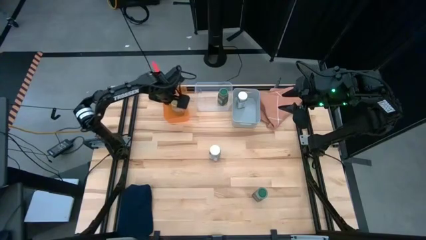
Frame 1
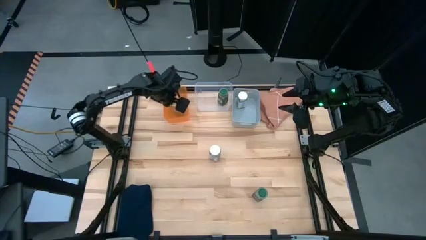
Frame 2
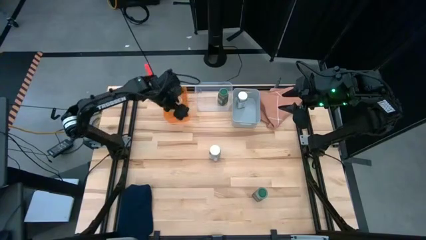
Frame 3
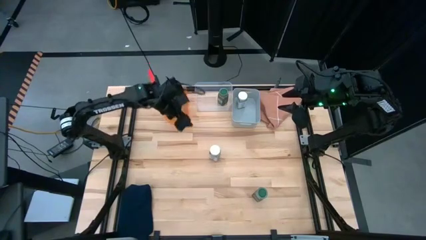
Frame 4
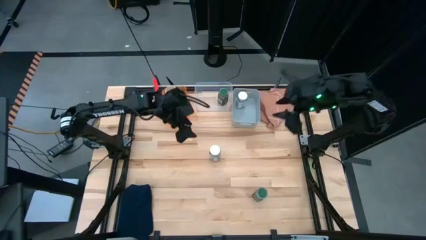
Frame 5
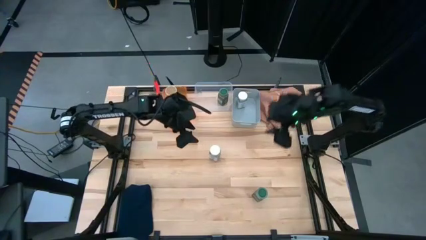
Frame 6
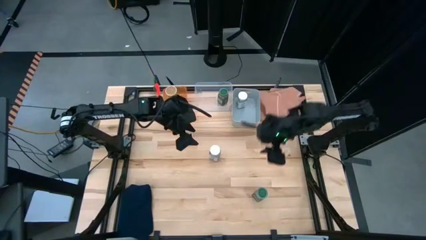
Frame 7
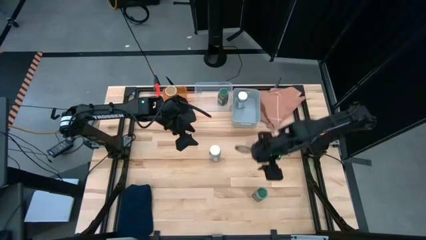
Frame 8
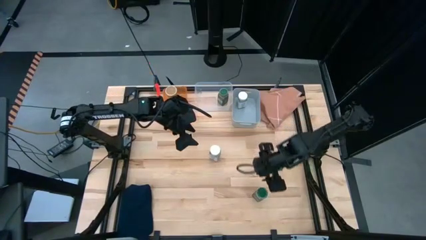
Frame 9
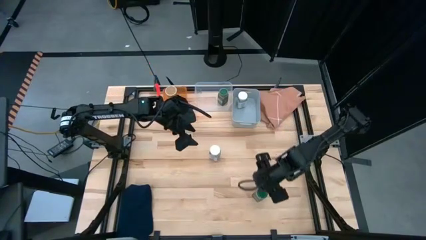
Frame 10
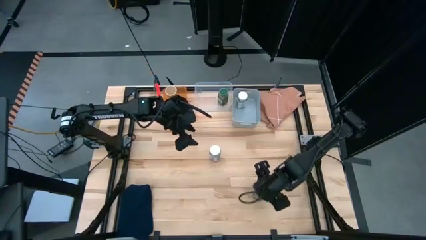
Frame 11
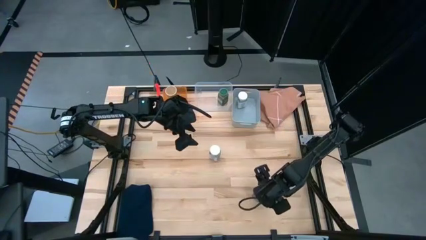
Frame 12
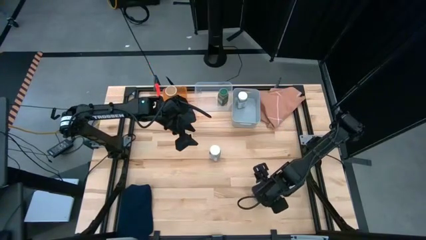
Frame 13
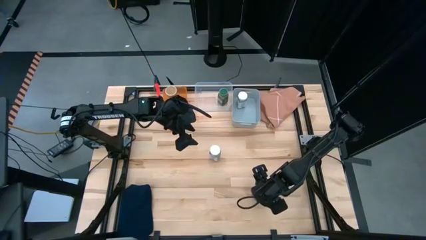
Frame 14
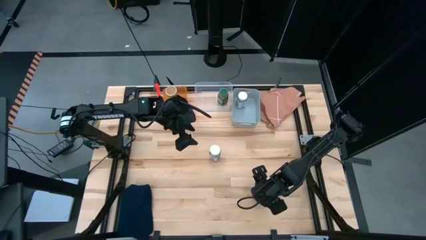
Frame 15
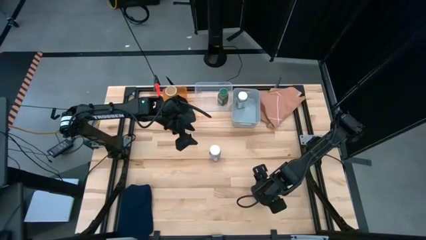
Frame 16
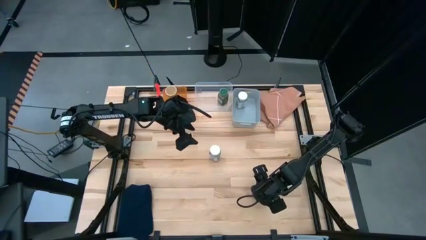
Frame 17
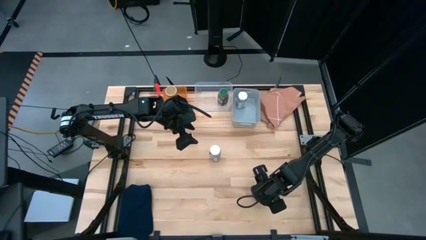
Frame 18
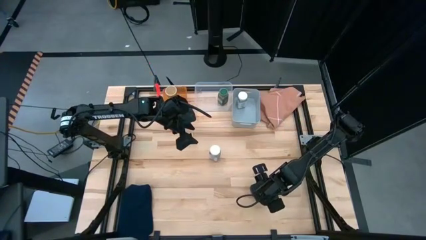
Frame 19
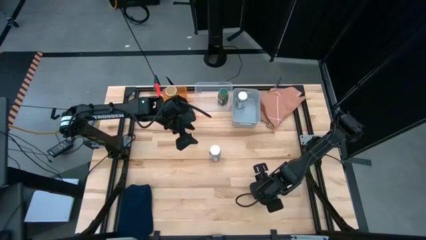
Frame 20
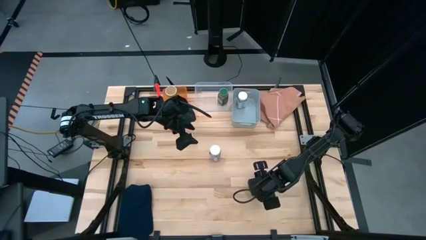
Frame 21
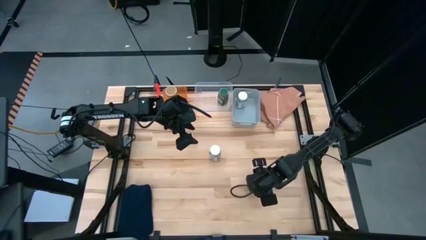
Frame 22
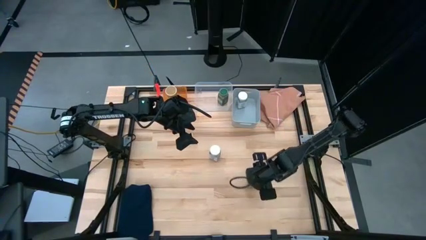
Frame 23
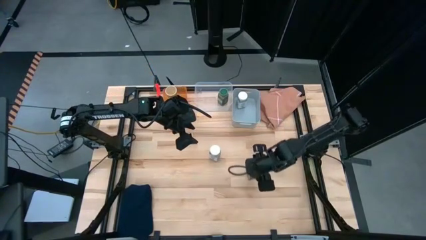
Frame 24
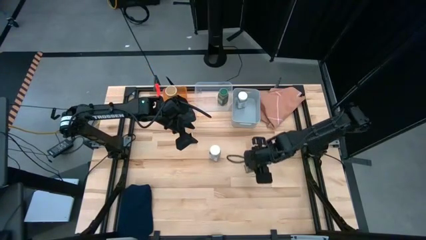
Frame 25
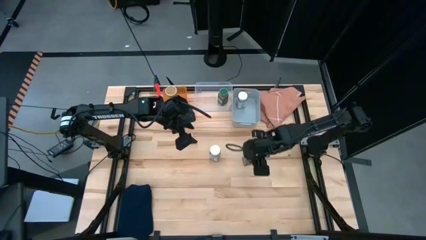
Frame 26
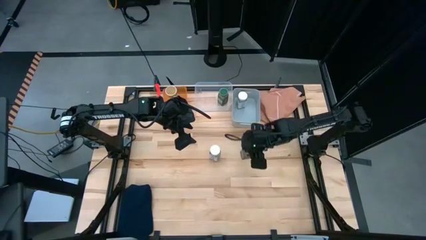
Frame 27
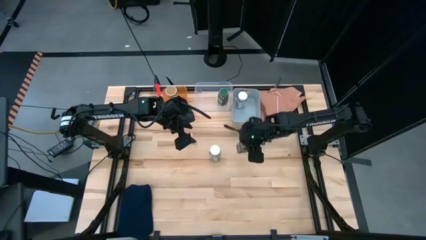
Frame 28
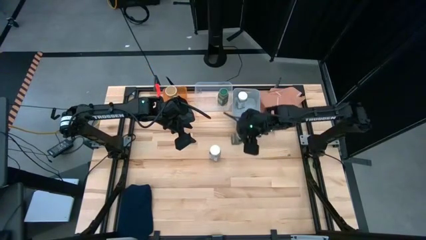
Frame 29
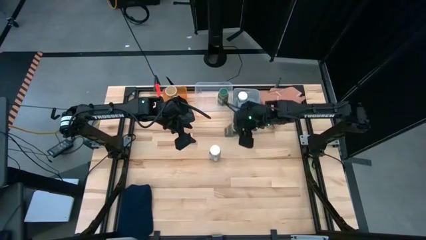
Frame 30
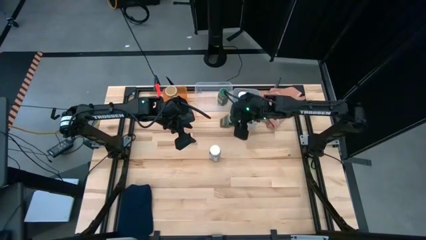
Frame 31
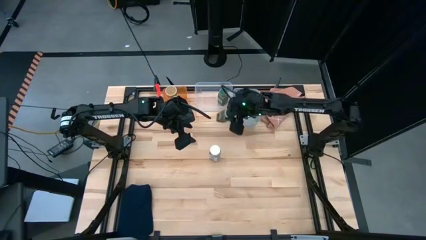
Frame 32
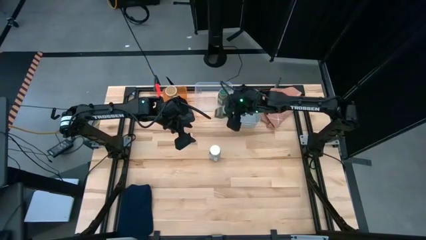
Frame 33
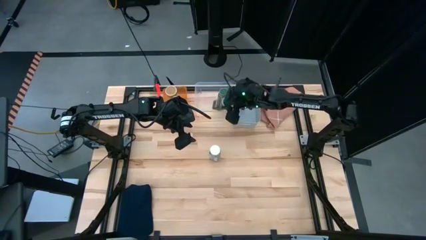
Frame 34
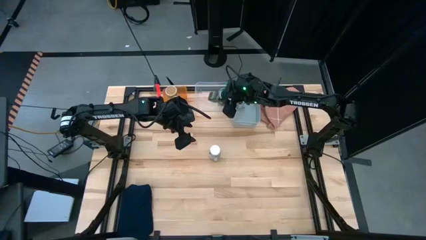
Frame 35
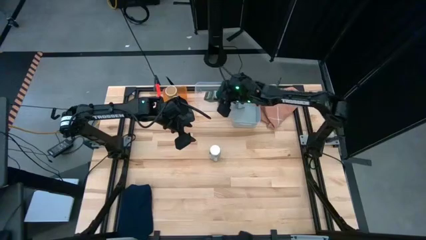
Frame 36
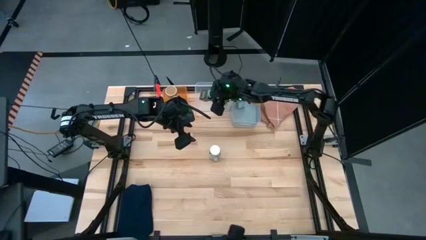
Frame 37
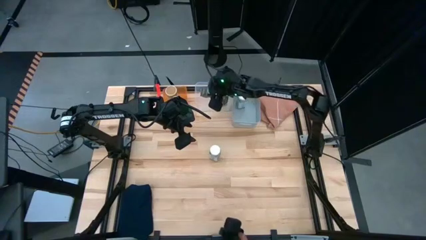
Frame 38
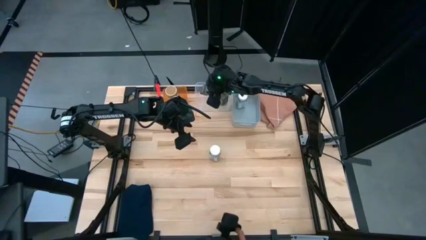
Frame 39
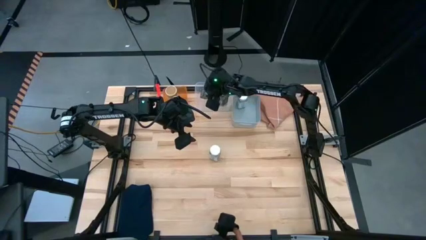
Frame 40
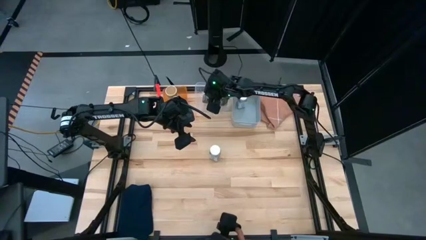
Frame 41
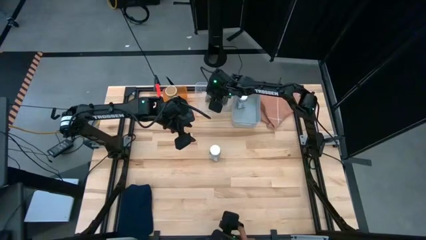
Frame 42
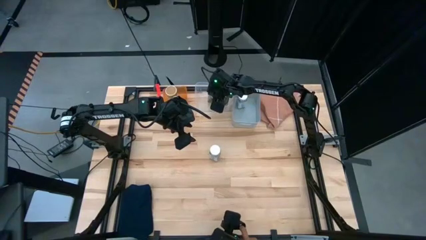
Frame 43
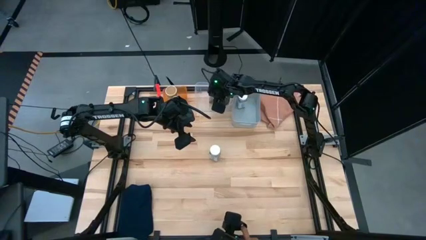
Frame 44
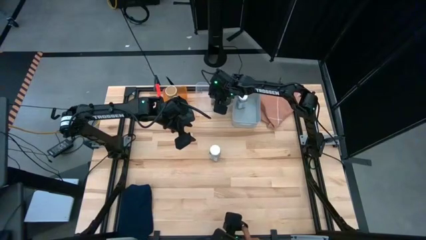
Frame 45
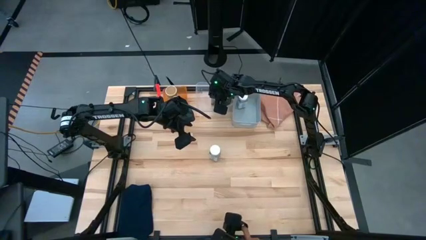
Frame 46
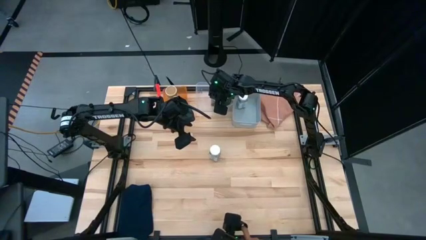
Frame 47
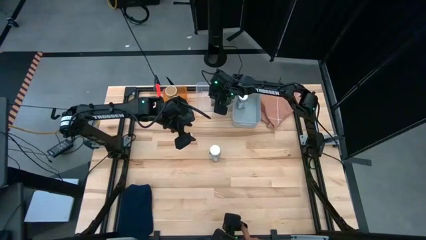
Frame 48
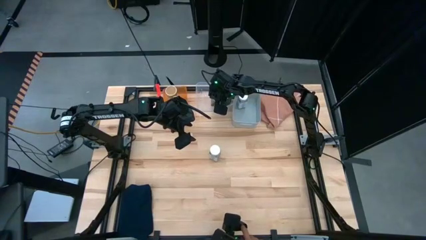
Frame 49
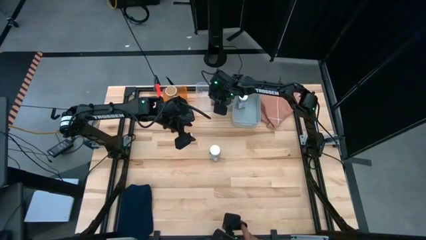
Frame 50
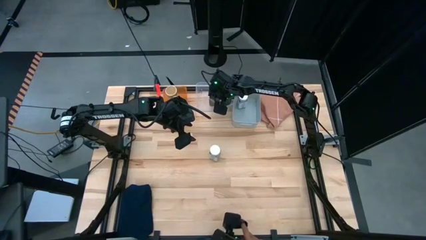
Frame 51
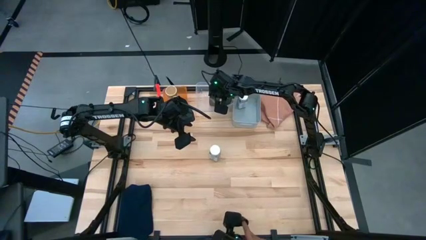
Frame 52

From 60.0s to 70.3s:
Task: Sort spices by type
Put the green seasoning bottle into the transparent bin

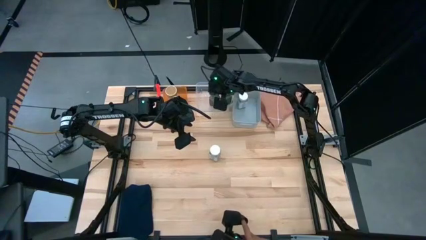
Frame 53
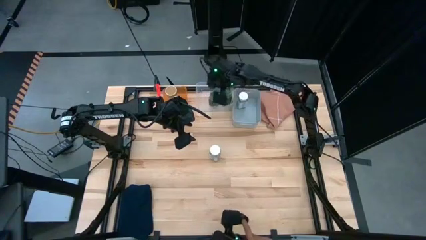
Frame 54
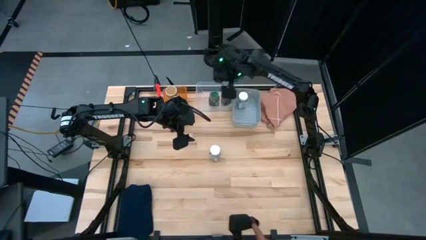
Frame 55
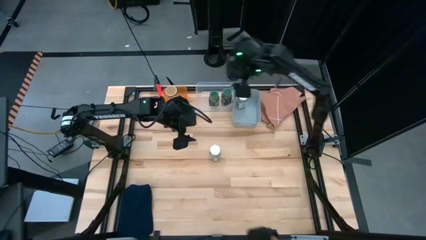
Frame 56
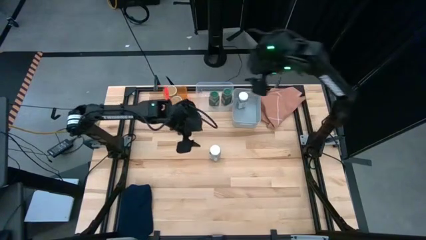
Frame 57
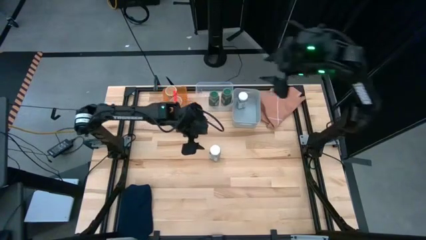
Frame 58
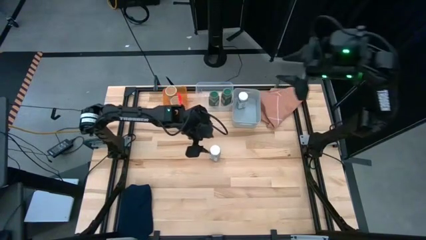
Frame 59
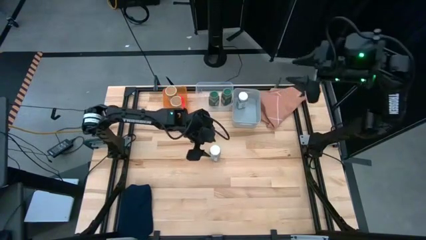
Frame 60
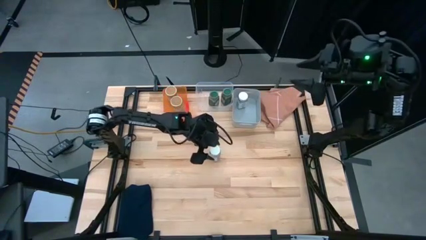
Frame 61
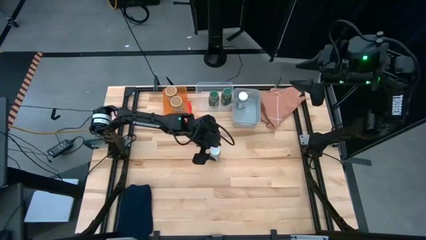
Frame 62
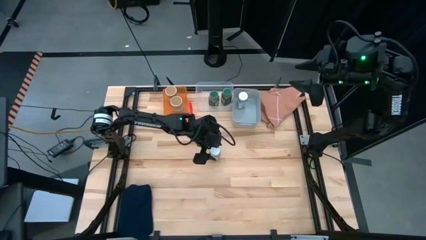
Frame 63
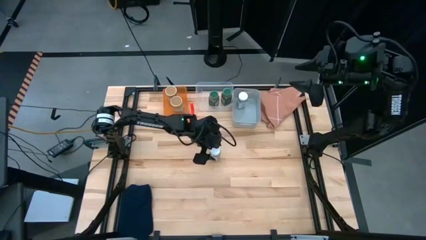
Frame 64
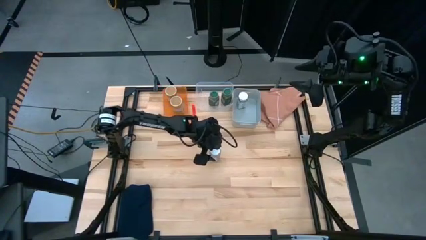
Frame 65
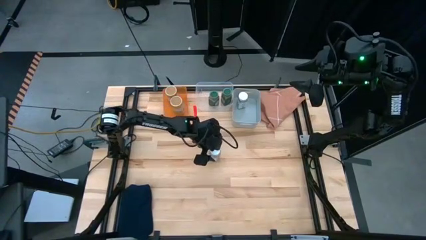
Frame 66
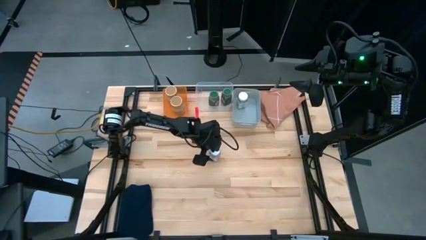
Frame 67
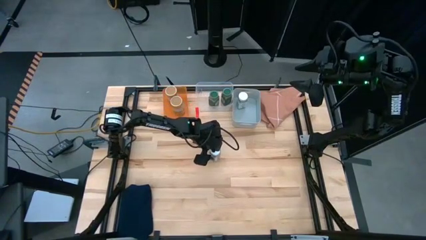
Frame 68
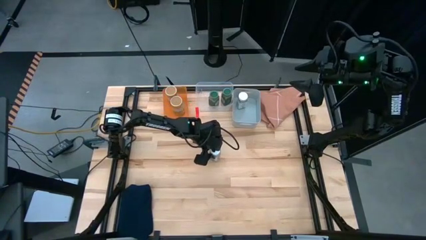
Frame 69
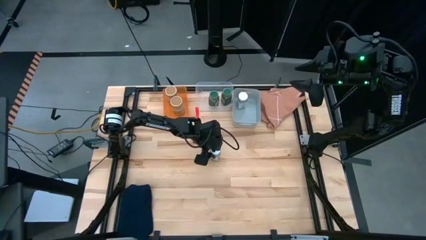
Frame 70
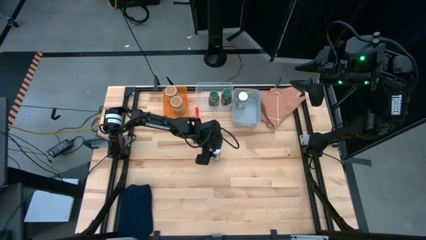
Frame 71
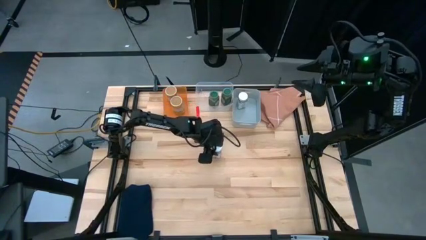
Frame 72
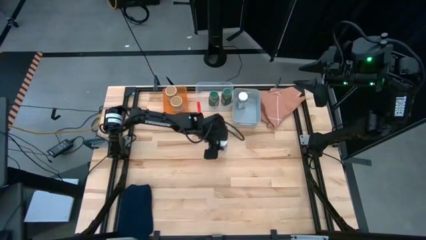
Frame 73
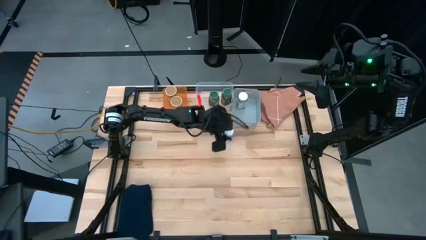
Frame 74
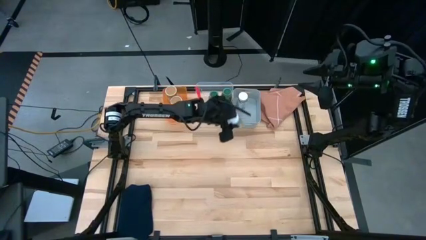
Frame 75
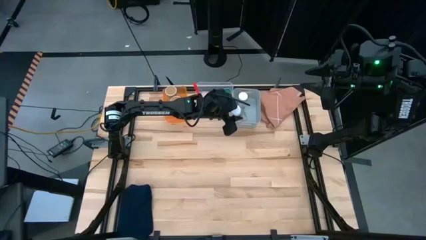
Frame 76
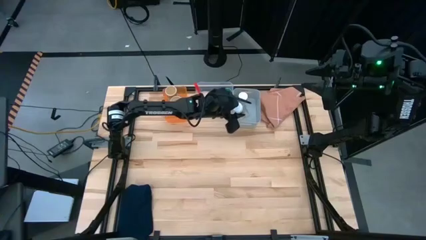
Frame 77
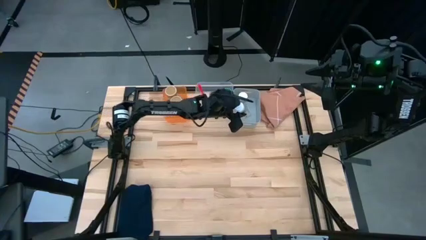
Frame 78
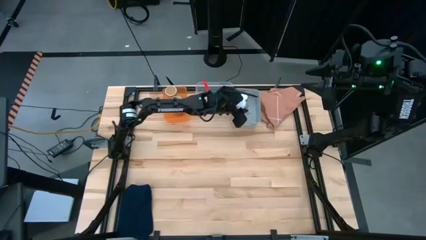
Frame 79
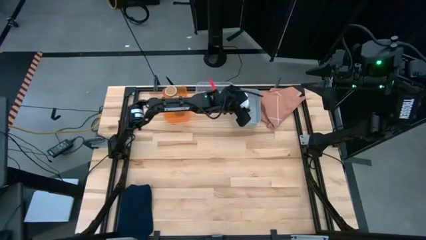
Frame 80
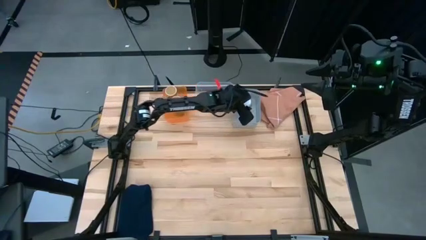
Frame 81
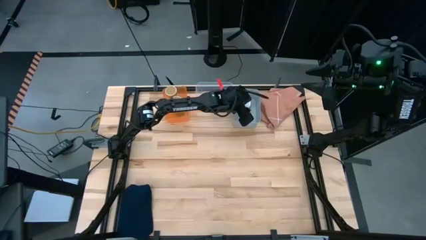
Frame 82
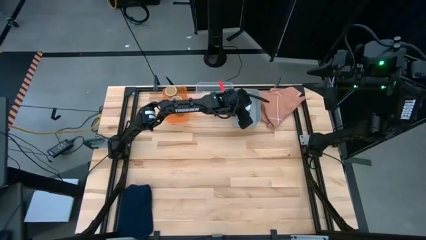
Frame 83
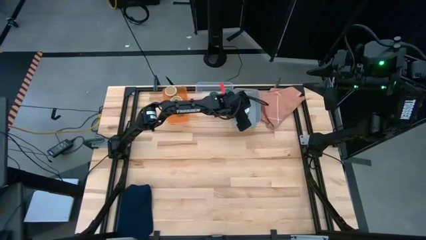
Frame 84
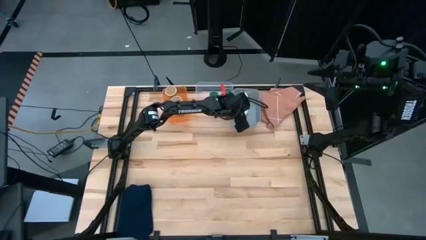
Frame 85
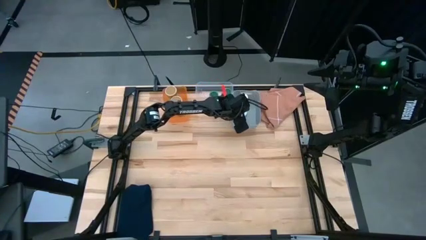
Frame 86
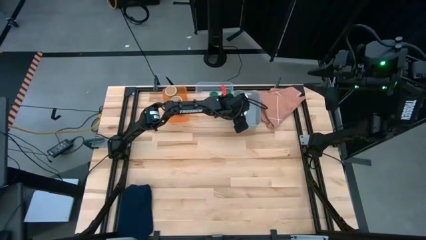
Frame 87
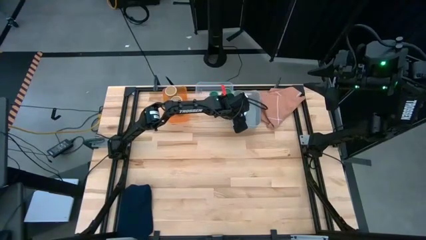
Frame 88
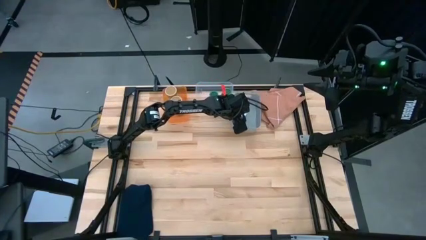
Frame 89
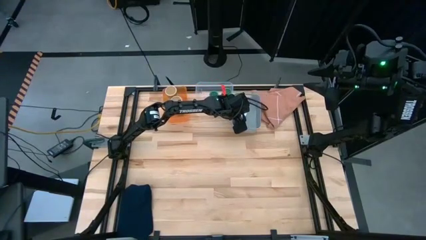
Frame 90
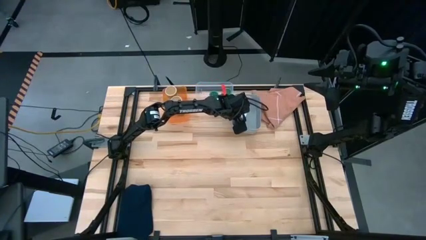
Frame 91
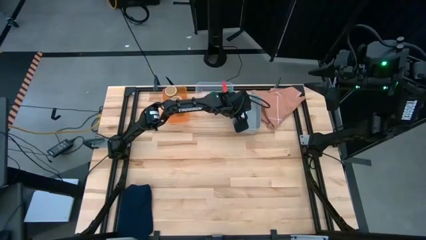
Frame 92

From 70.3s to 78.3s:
Put the white seasoning bottle into the gray bin
